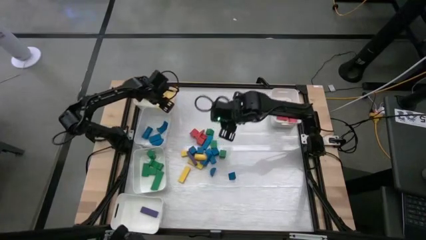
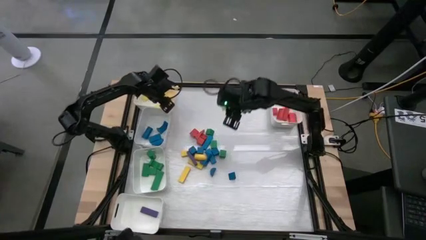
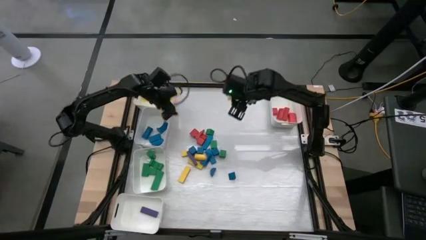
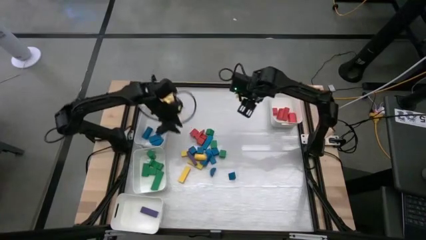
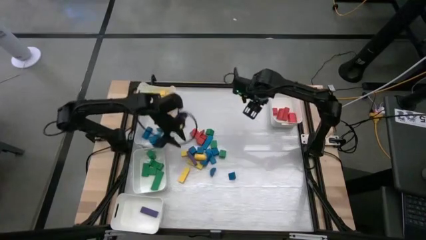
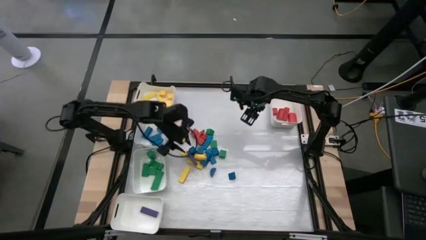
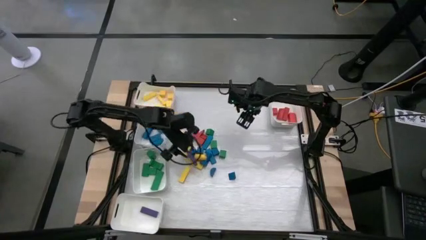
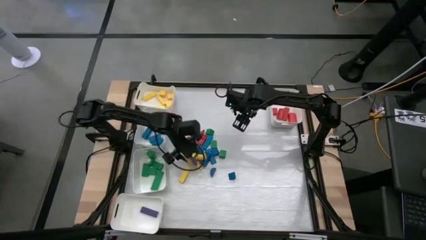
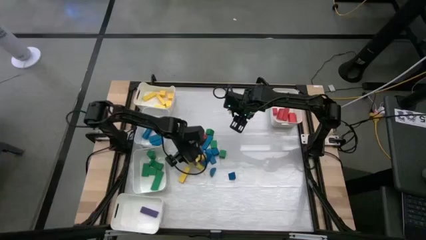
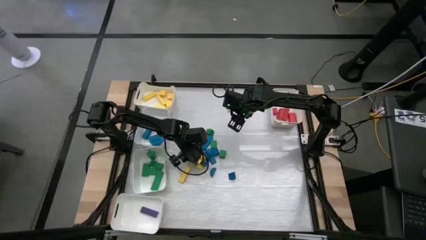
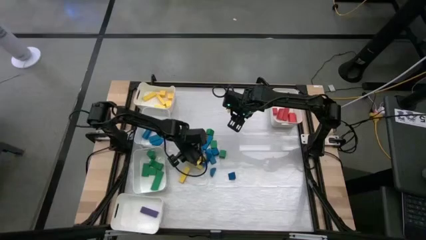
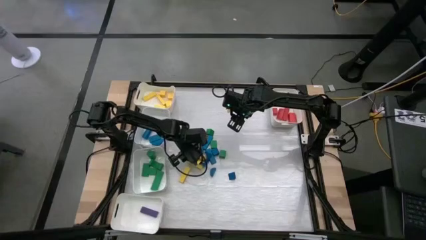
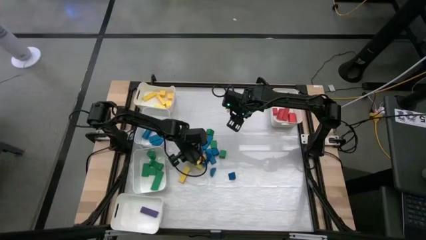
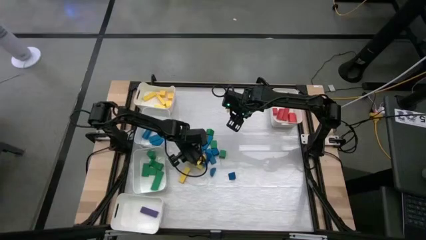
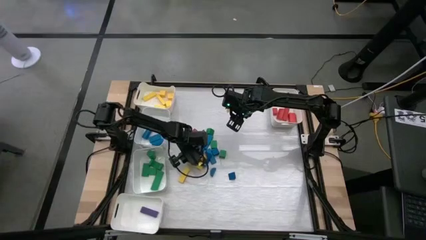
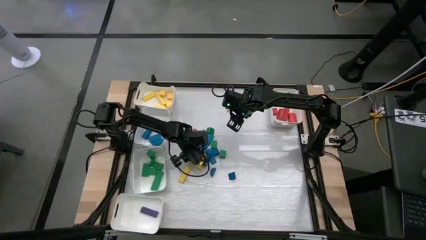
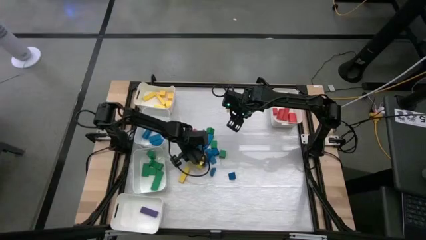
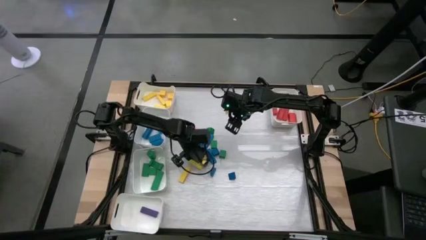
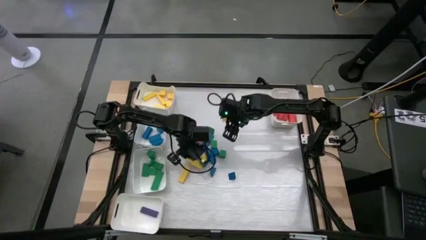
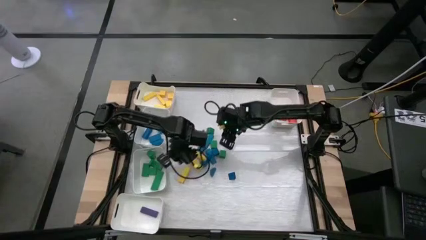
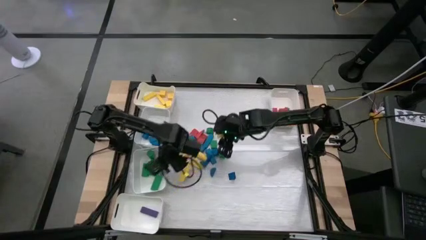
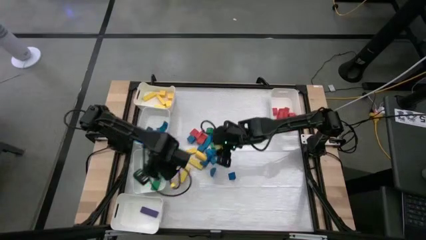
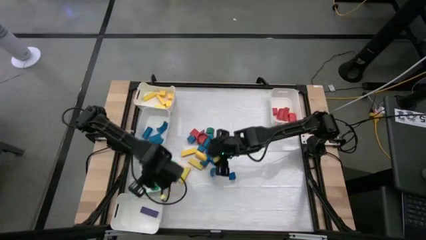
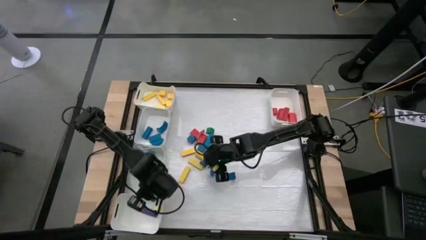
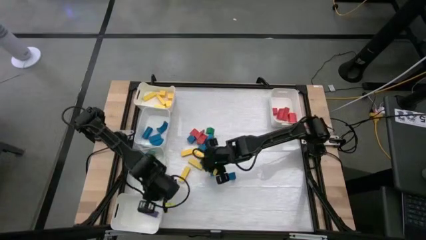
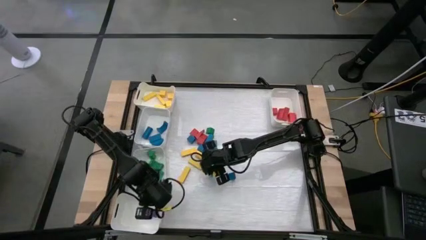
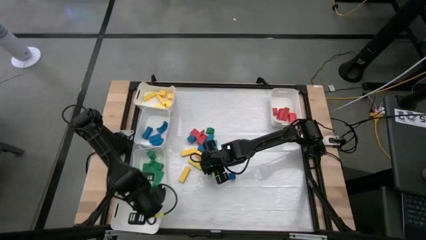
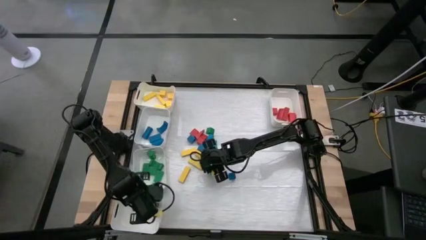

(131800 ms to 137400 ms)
Task: Sort blocks
Put the purple wooden block into the bottom left white bin

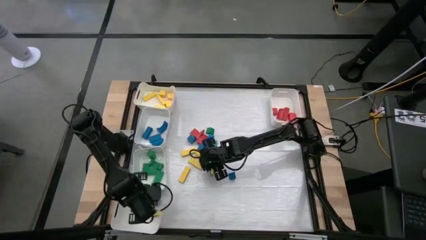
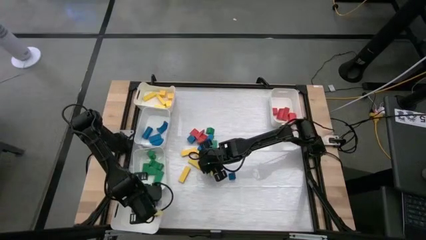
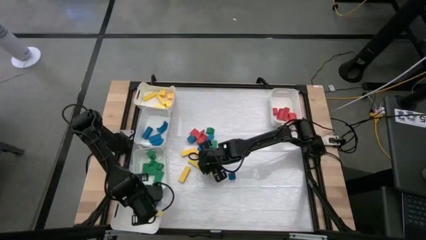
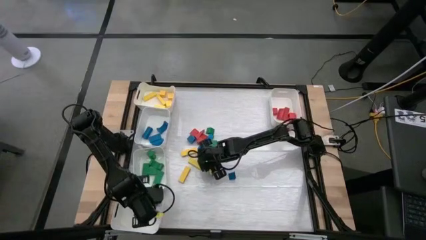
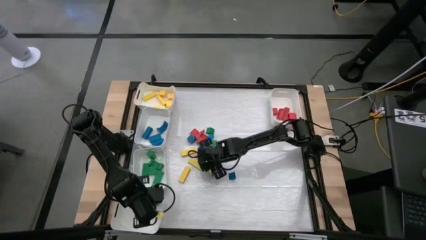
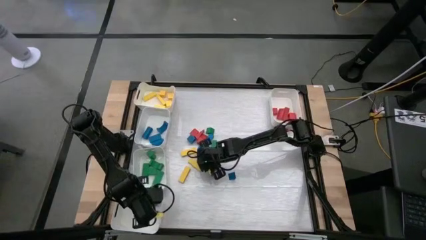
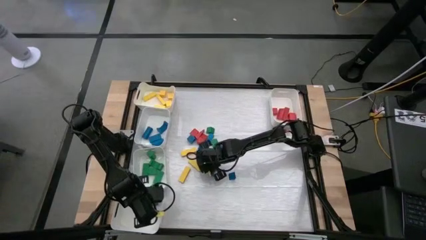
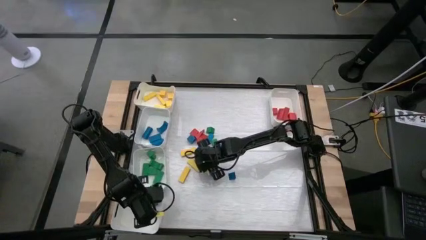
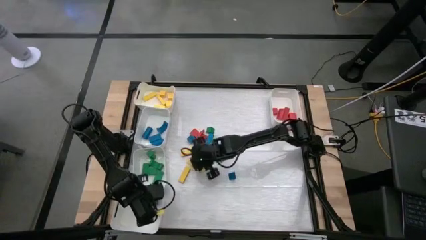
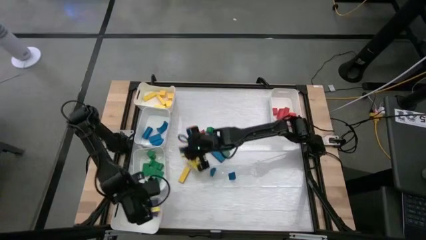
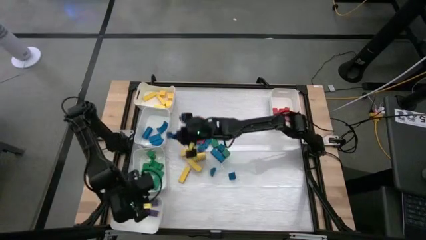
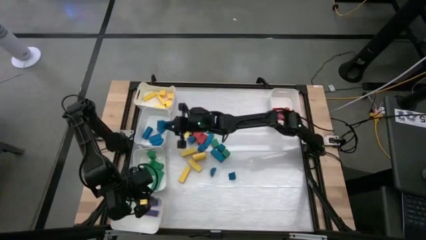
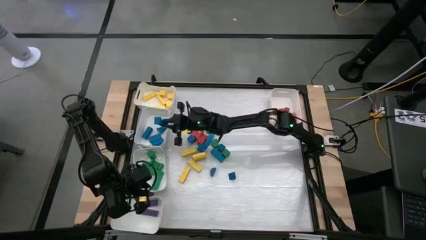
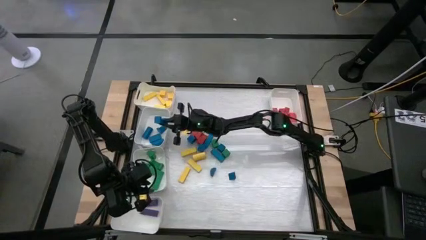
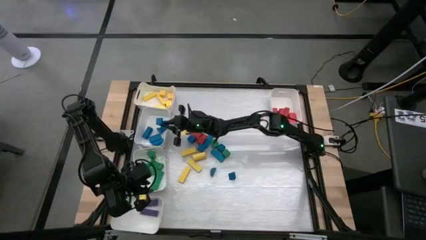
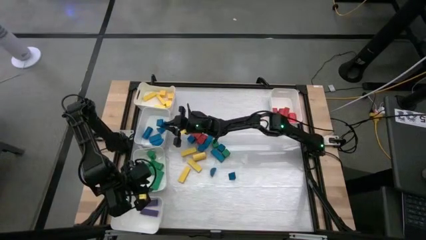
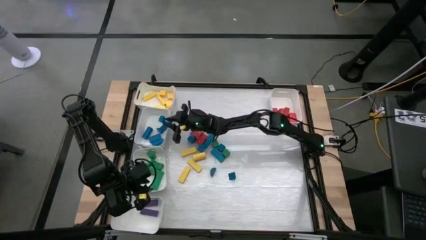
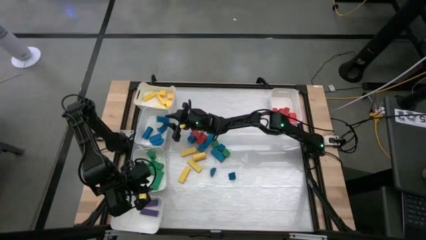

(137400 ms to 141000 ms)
Put the blue wooden block into the top middle left white bin

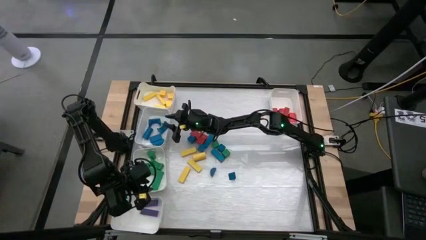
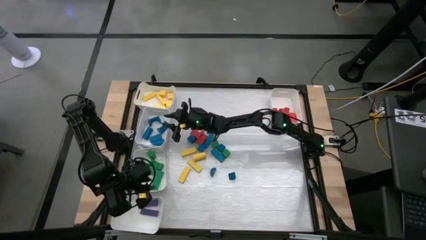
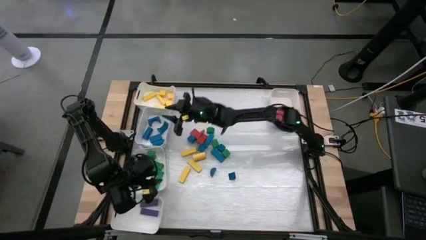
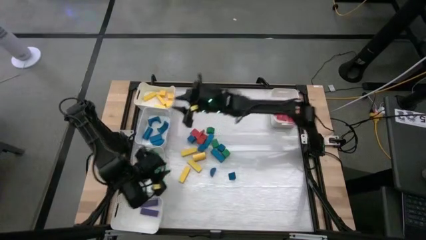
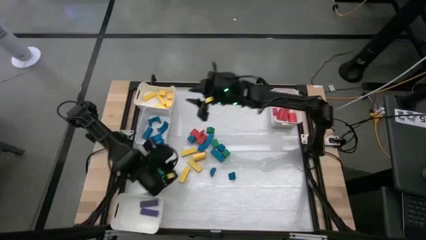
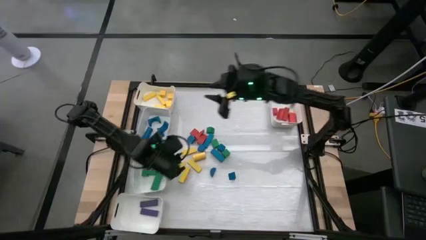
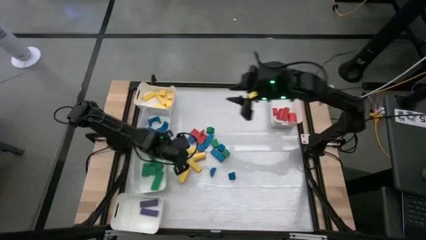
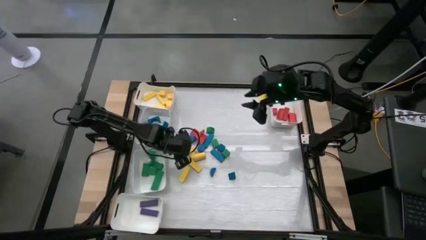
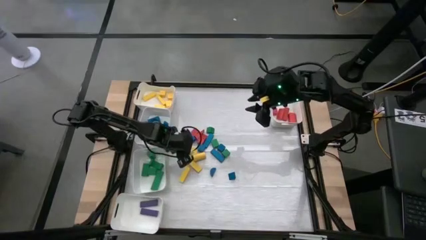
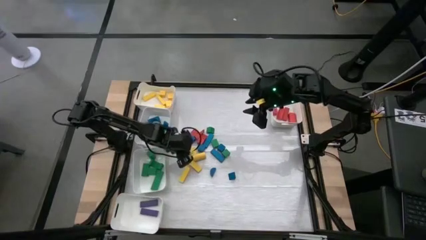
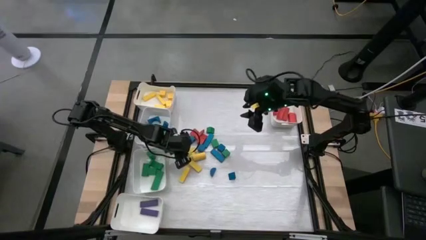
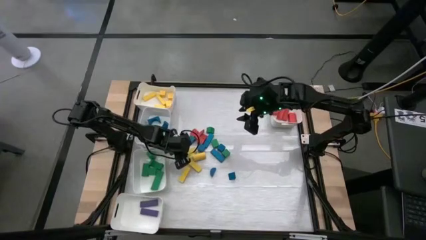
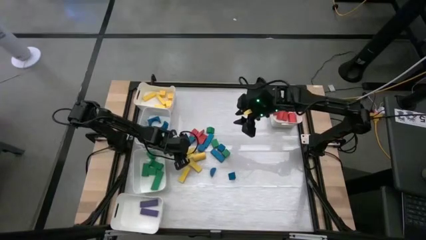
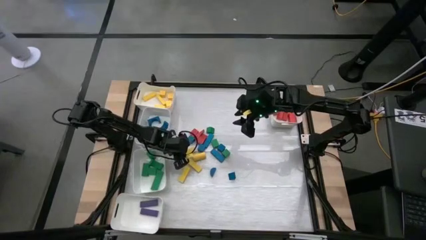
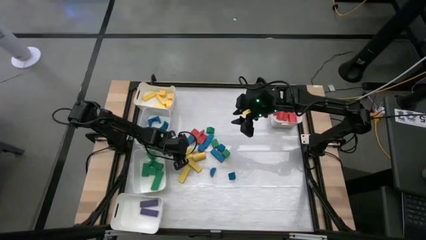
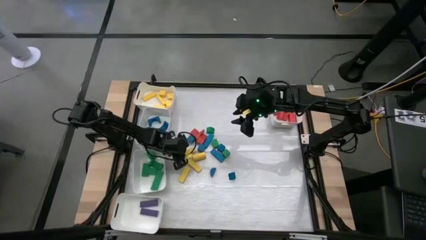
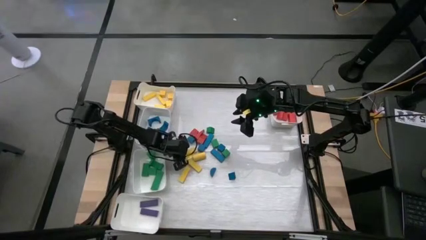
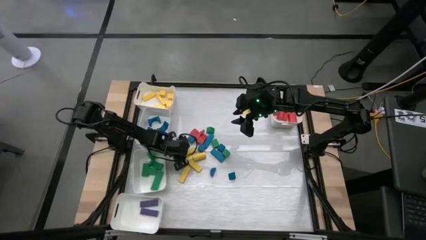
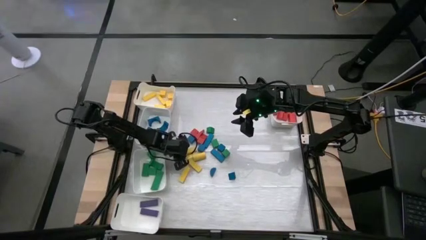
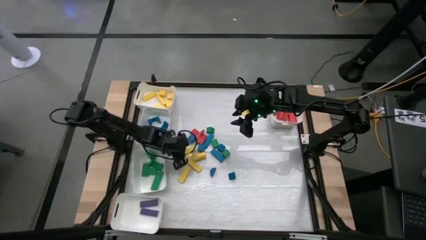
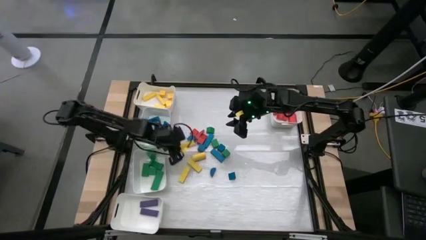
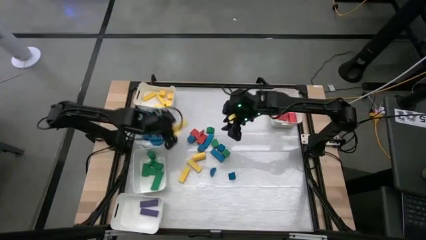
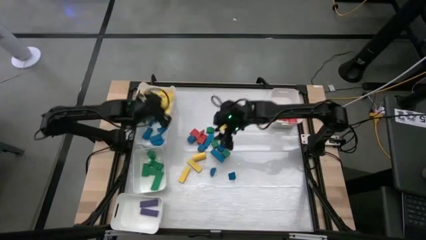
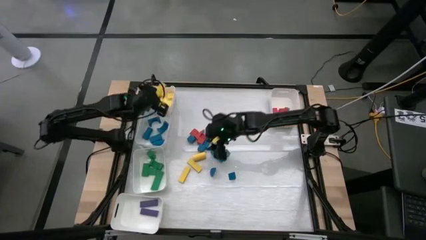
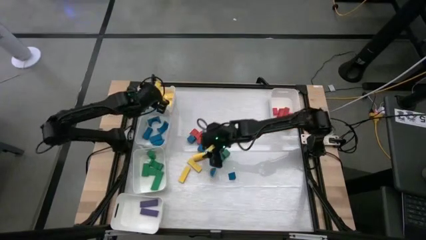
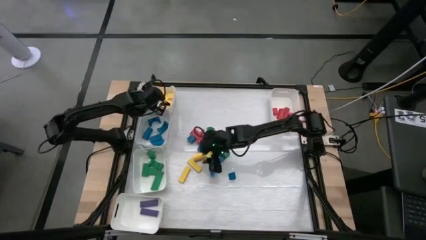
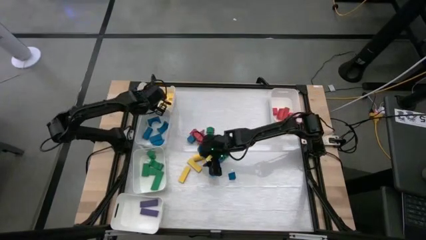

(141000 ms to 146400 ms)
Put the yellow wooden block into the top left white bin

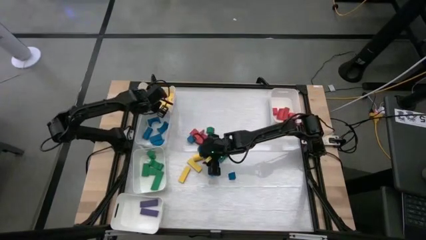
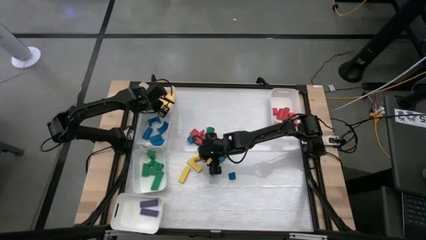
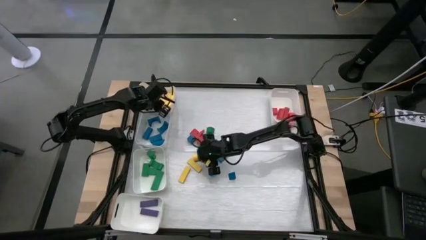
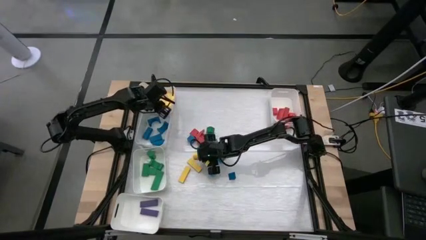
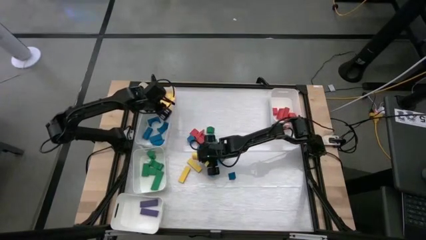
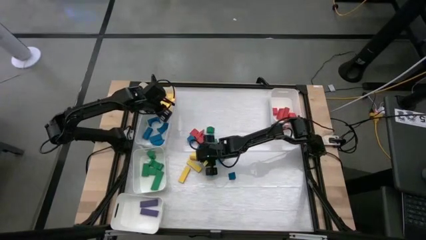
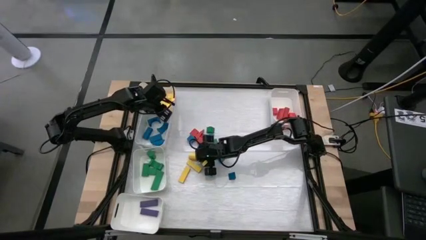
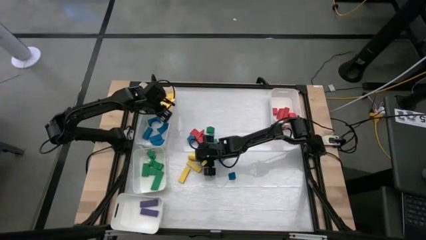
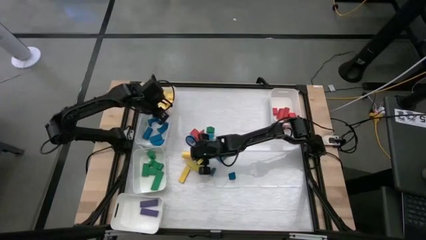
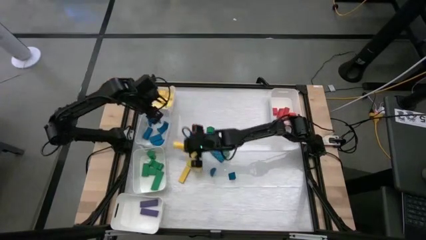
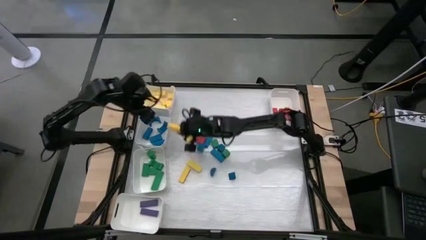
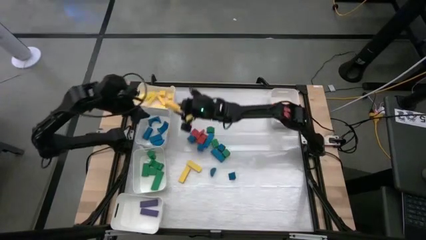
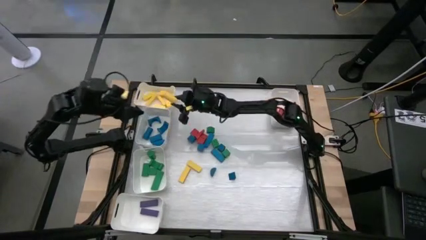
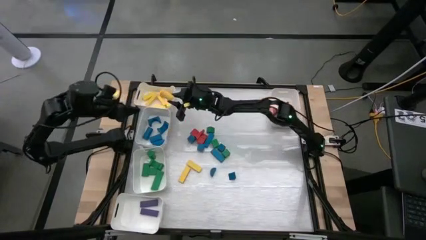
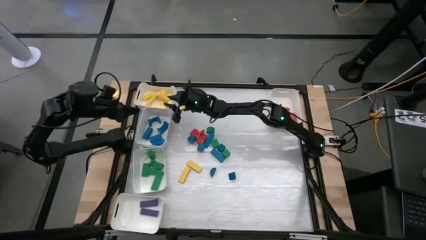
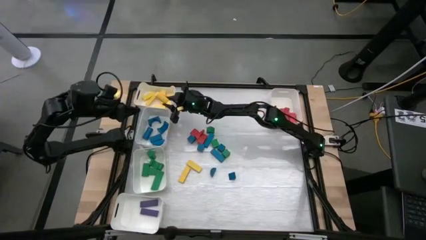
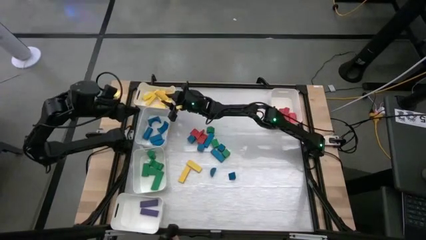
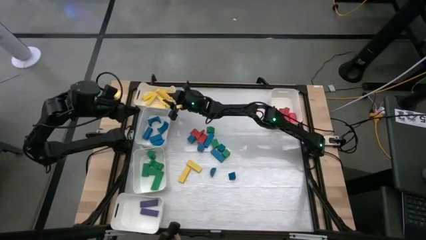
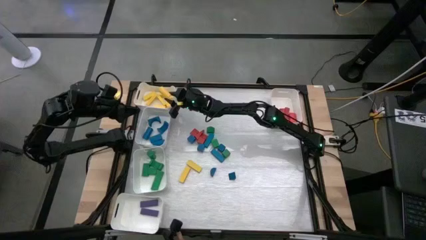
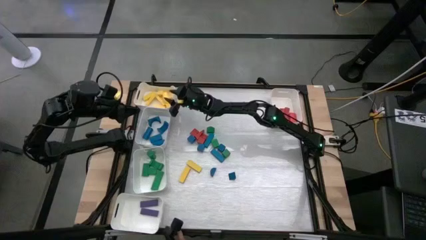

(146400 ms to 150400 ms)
Put the yellow wooden block into the top left white bin
